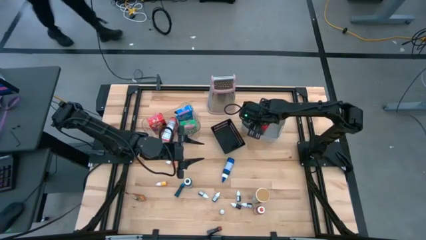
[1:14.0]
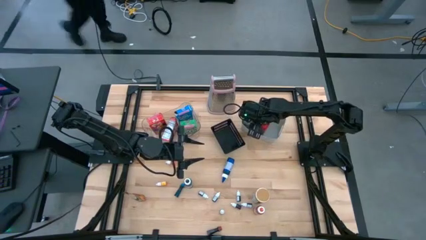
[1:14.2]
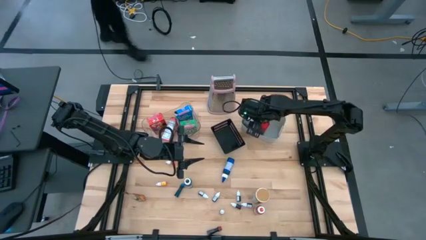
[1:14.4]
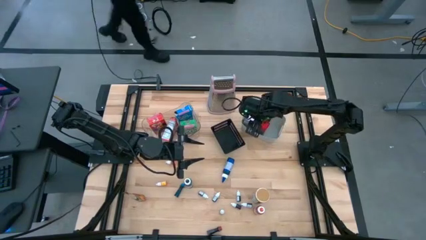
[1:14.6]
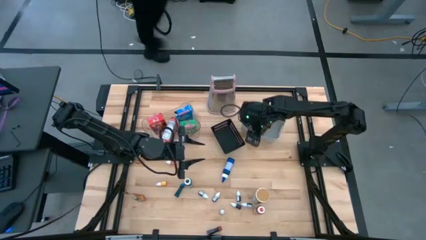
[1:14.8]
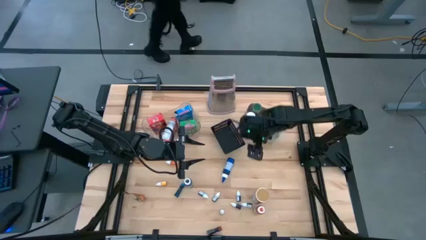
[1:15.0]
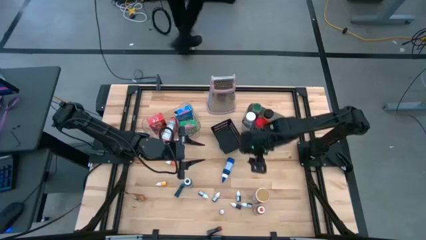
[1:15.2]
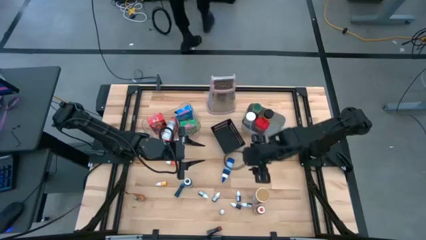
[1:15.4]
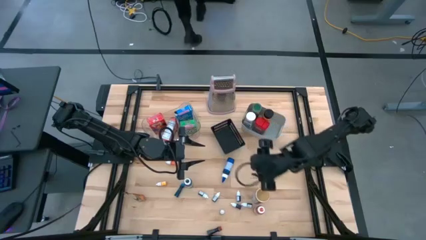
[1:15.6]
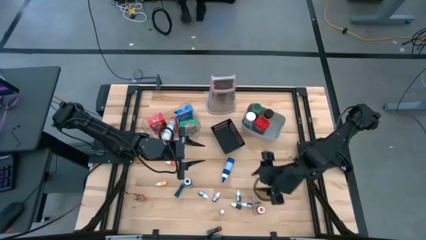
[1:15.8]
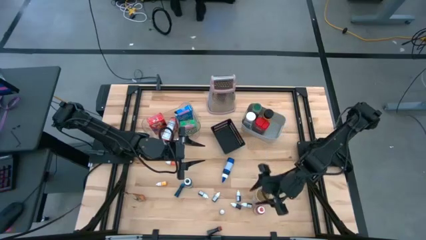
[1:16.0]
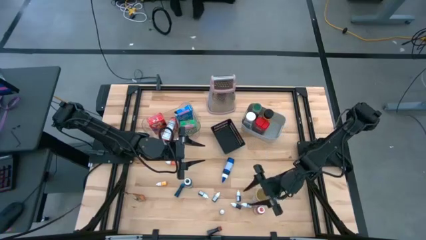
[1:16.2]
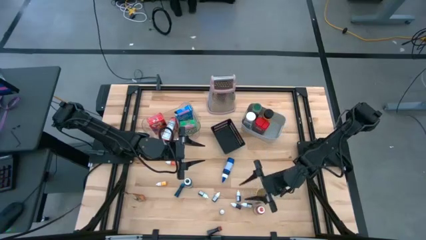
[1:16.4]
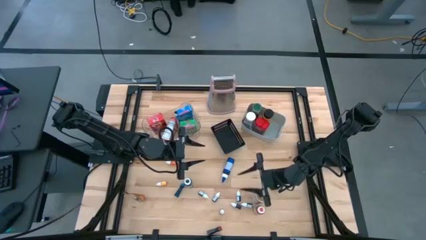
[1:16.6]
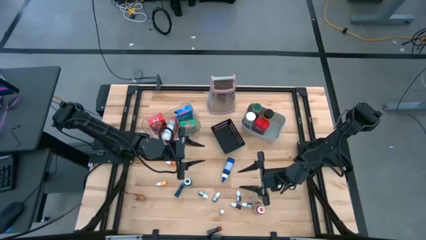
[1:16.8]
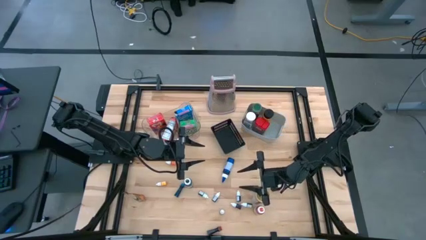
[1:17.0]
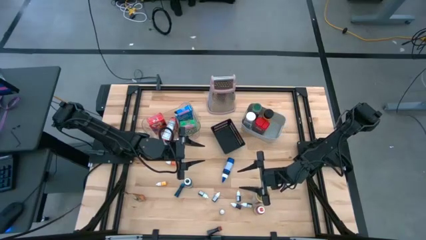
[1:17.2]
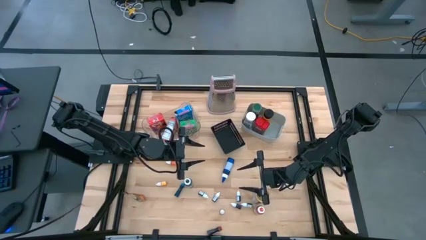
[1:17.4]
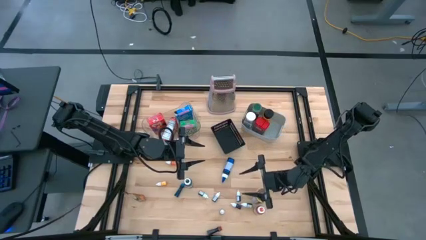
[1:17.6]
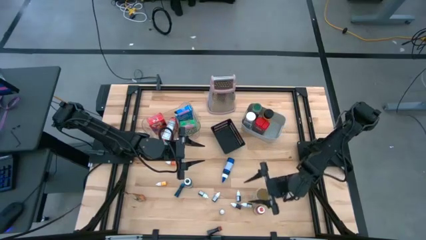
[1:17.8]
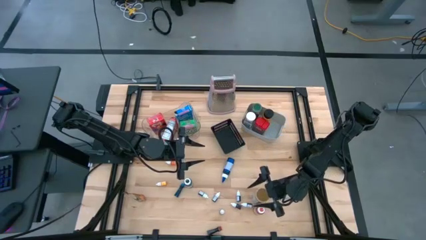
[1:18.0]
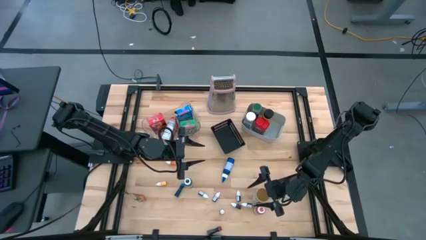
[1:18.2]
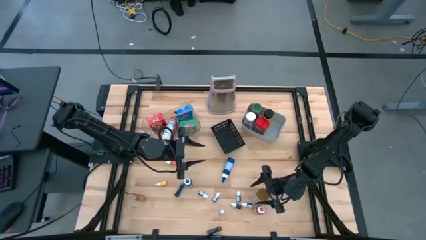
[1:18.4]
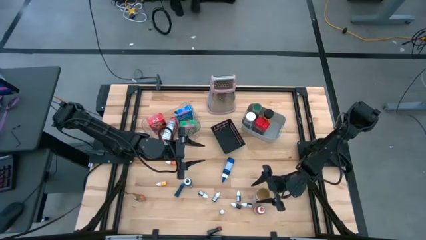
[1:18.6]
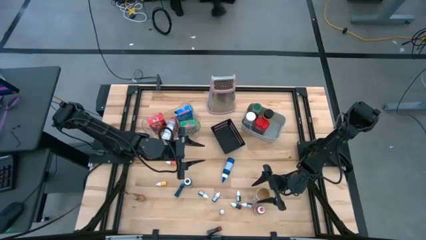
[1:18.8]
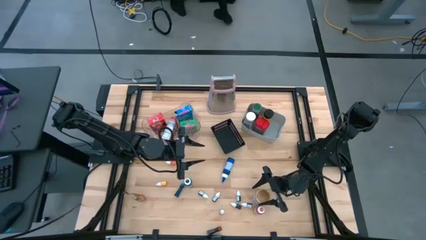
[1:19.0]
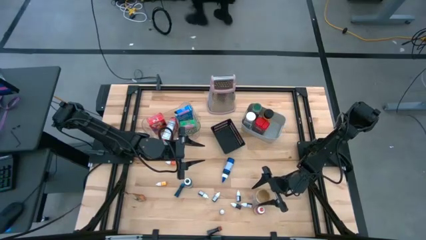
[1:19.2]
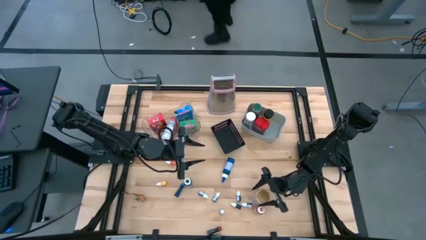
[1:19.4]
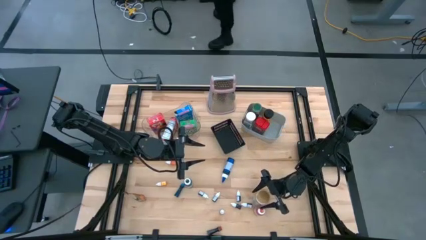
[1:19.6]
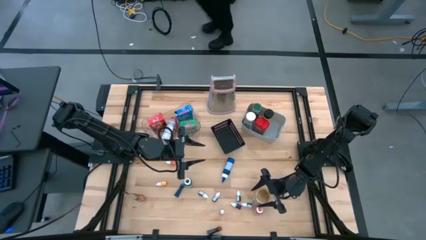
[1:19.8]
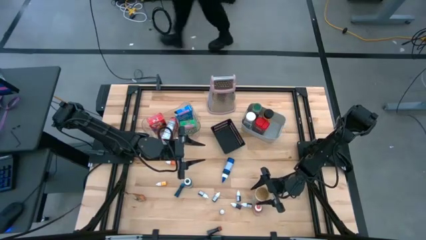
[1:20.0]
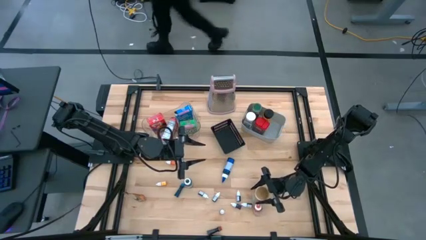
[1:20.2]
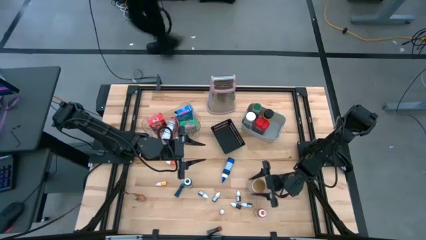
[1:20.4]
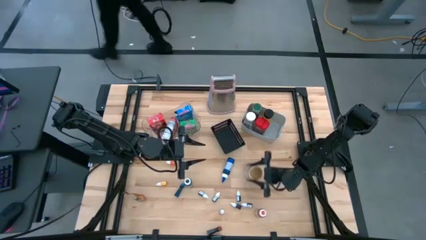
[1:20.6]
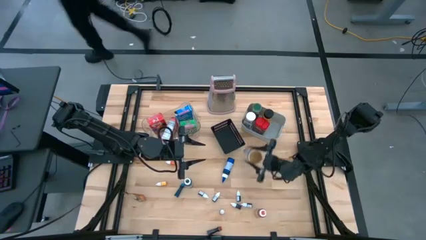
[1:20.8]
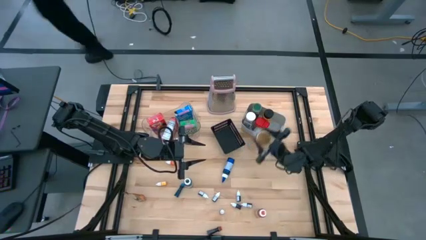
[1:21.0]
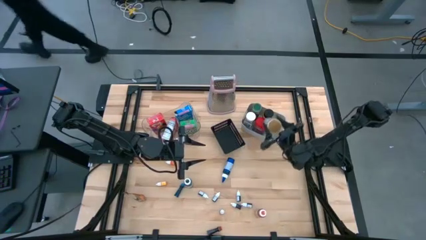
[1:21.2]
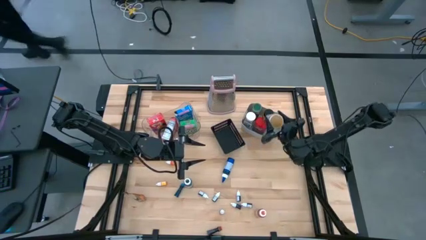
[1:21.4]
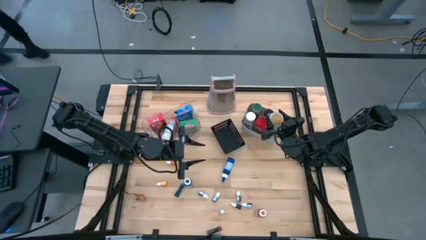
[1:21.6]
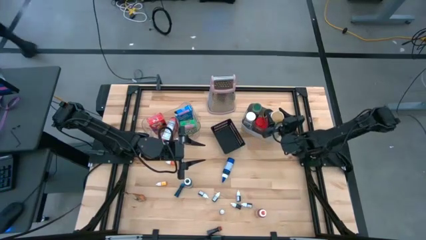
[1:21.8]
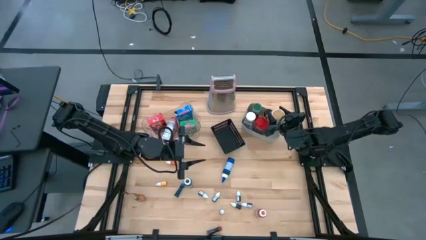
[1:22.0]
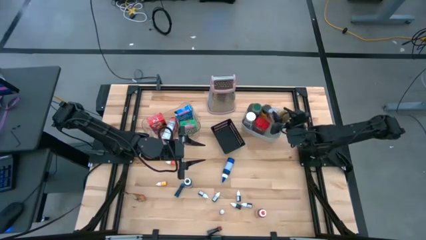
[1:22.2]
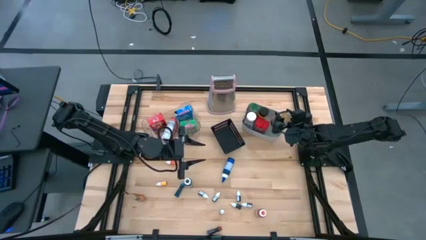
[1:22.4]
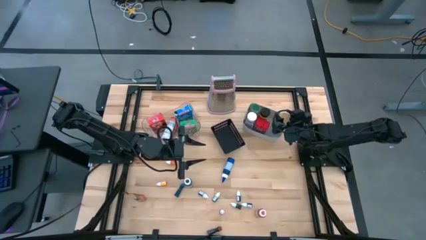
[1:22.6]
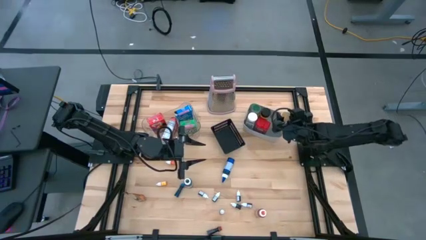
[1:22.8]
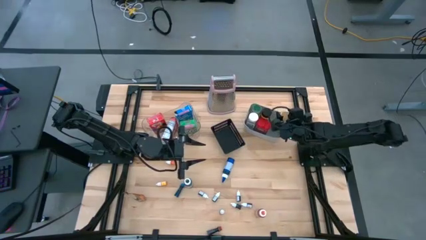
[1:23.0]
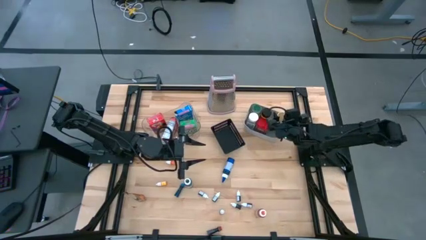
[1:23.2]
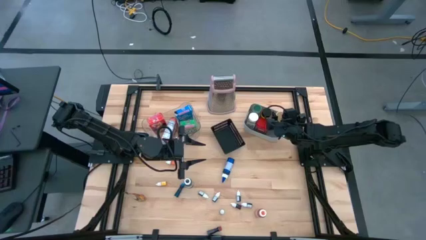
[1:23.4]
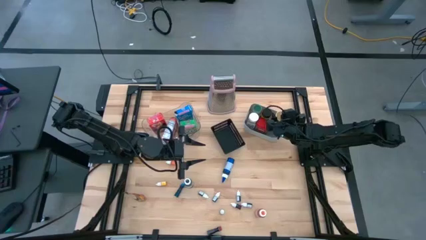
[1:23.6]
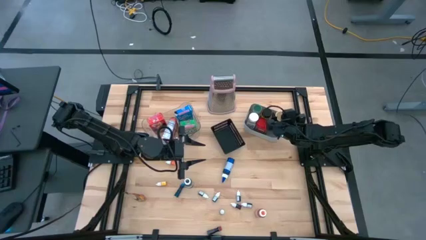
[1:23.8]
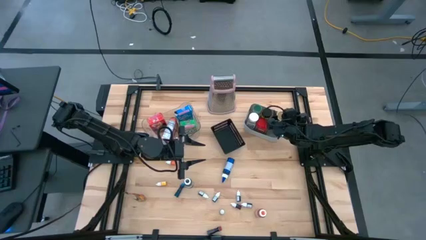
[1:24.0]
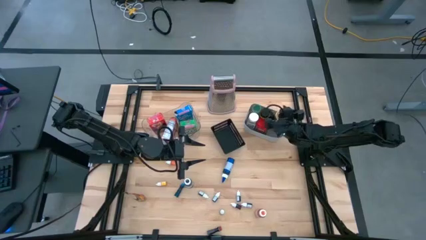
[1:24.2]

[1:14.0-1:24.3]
Task: Pick & Place Kitchen Items
Put the brown seasoning bottle into the gray bin

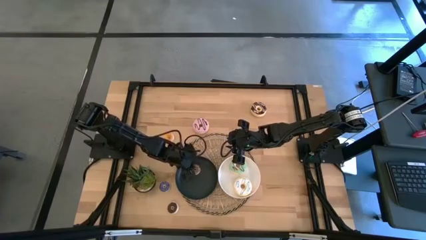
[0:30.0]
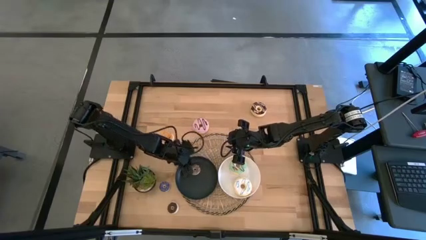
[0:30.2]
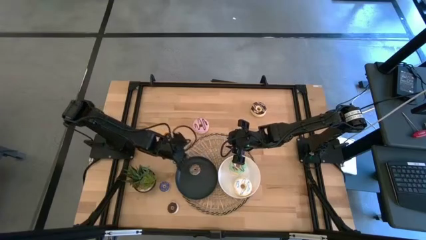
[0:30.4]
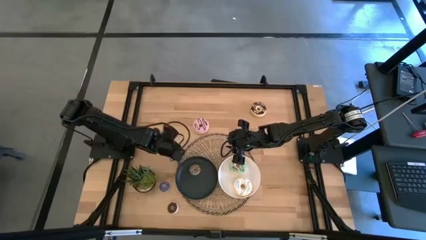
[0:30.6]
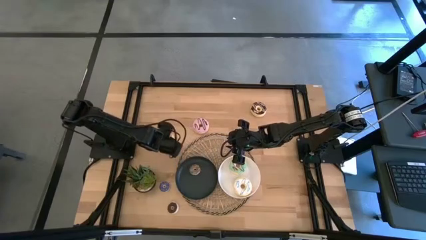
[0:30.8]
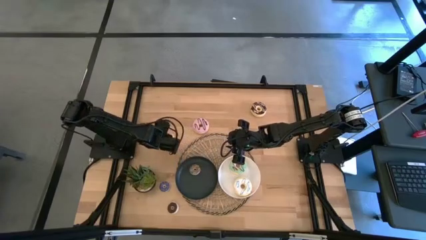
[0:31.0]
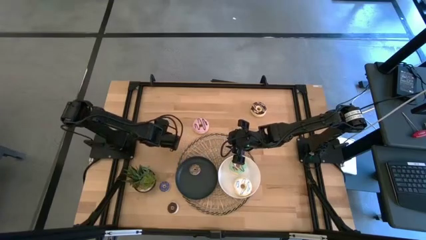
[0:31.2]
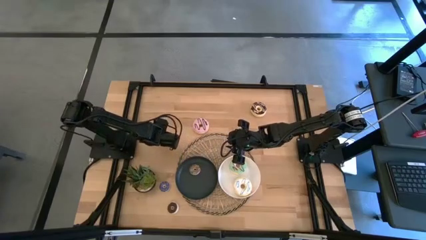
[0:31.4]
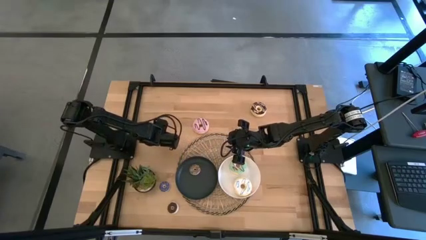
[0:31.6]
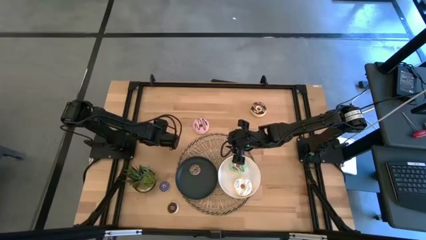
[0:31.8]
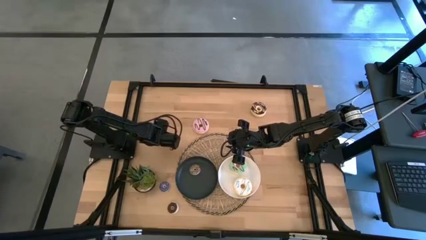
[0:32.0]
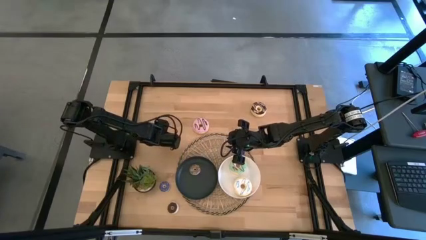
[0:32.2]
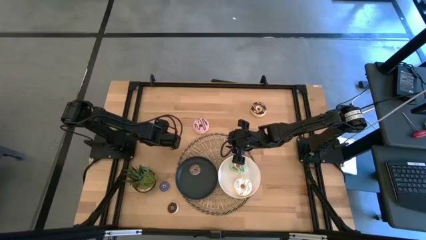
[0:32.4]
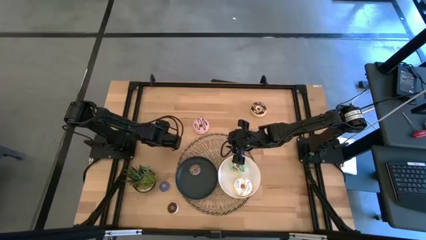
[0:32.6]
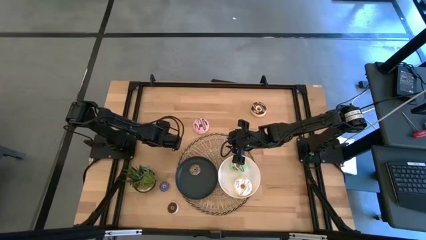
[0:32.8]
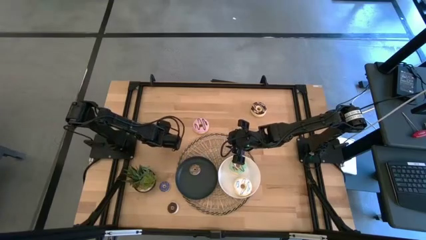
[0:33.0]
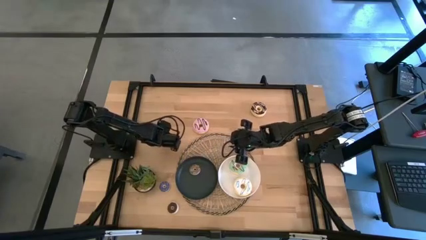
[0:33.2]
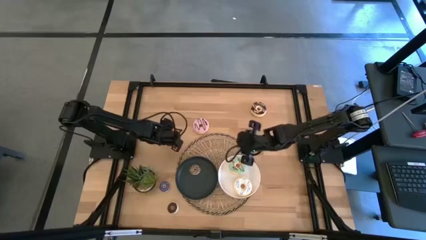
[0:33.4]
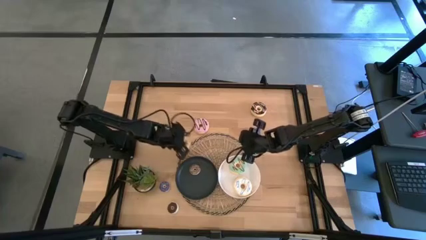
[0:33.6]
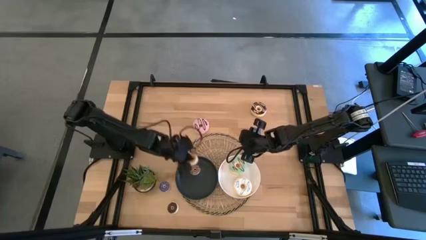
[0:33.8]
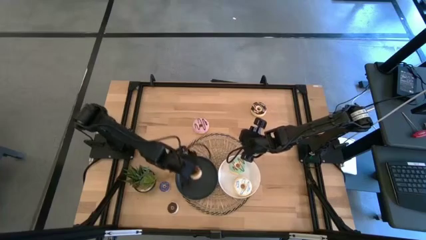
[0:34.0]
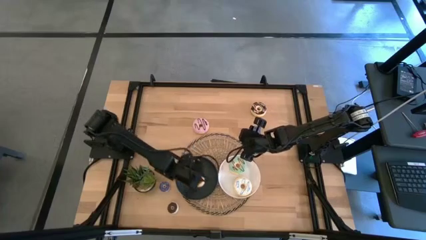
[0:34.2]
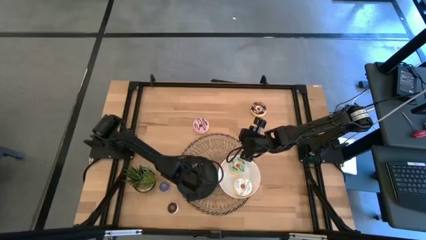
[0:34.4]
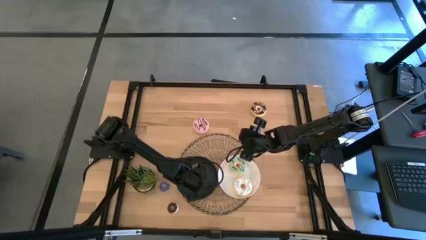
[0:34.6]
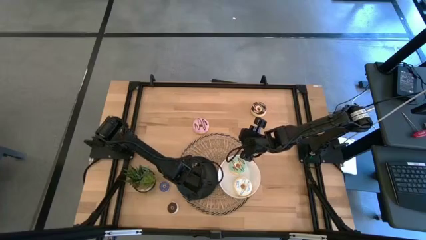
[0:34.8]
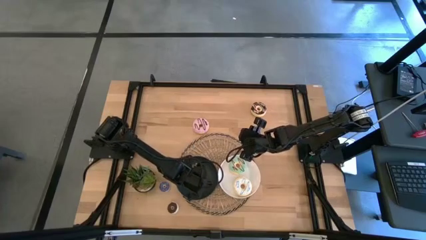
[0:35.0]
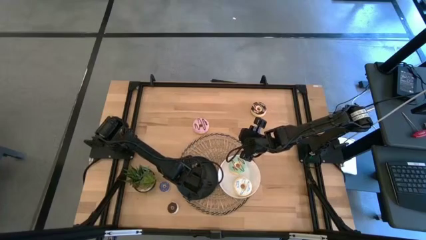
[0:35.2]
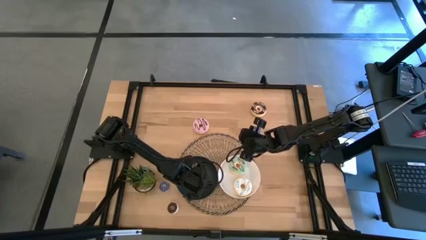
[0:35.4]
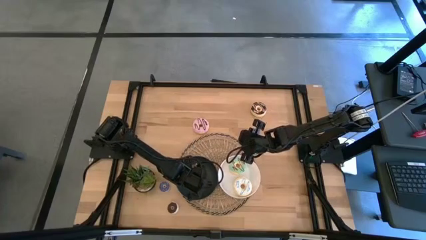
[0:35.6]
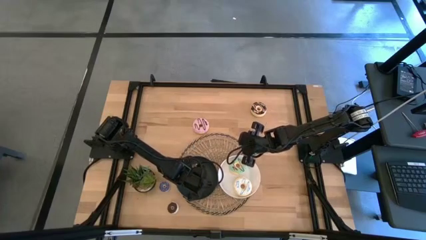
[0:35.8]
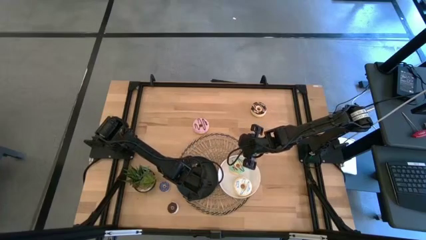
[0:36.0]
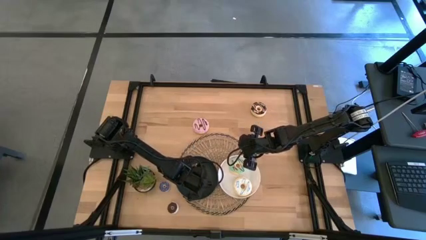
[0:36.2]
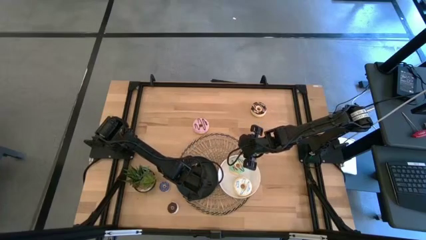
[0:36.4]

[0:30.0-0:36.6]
Task: Pick & Place donuts
Put the small orange donut on the black plate
